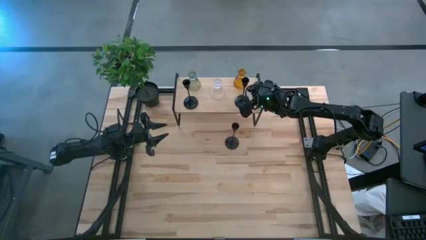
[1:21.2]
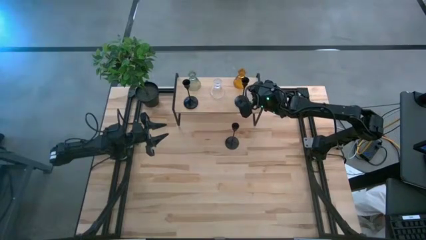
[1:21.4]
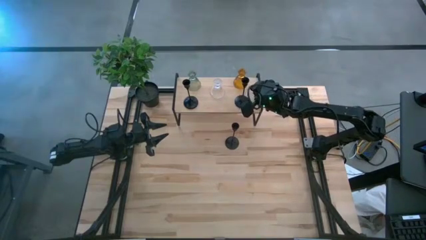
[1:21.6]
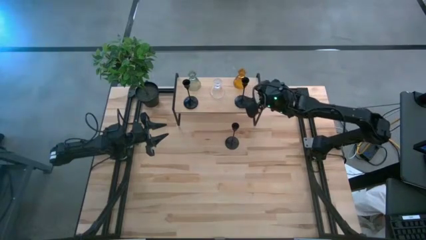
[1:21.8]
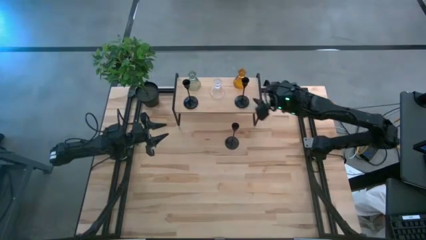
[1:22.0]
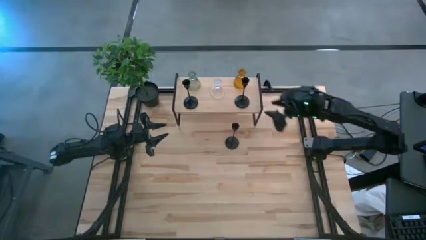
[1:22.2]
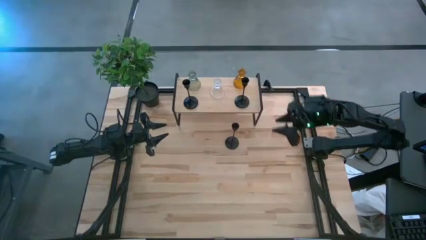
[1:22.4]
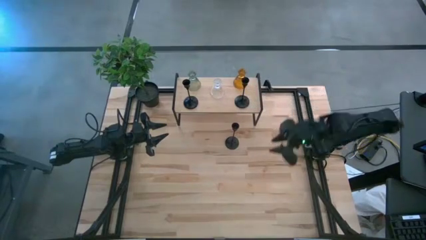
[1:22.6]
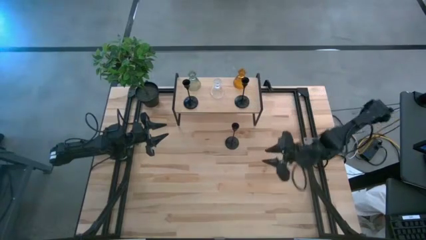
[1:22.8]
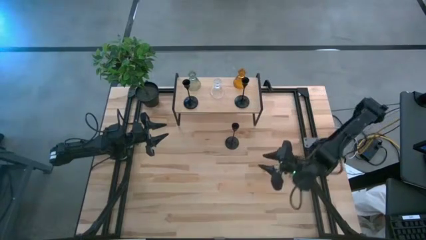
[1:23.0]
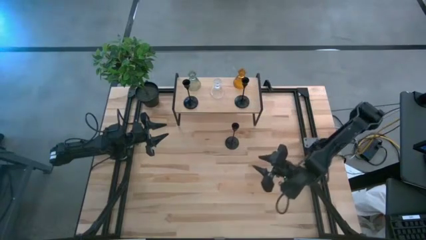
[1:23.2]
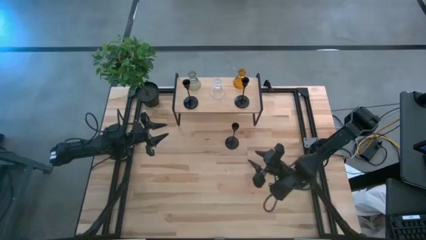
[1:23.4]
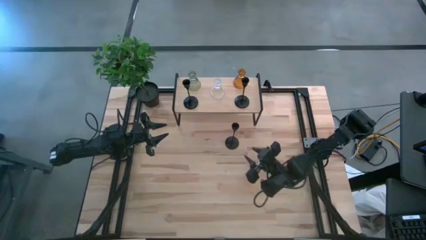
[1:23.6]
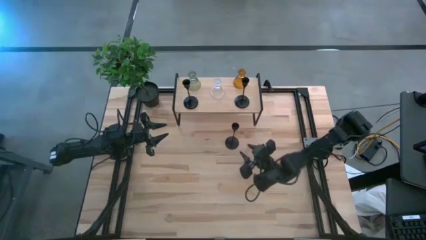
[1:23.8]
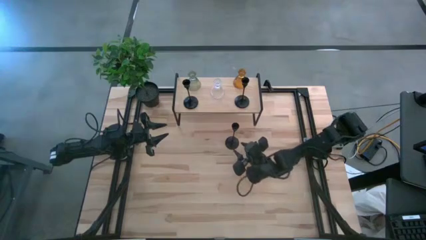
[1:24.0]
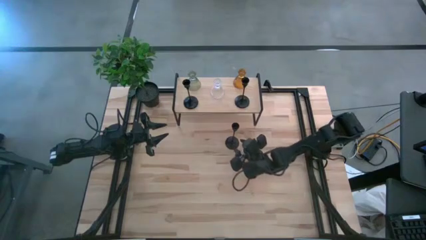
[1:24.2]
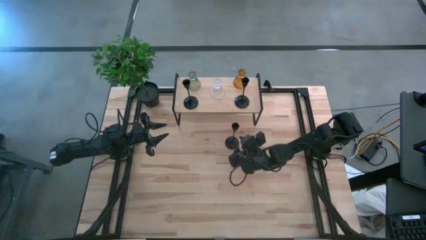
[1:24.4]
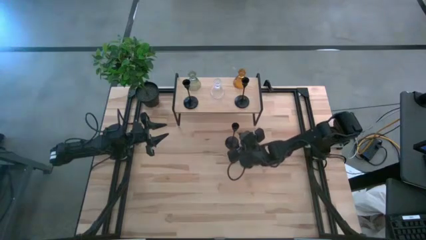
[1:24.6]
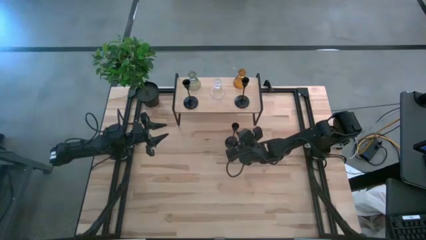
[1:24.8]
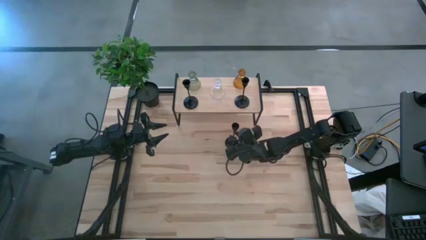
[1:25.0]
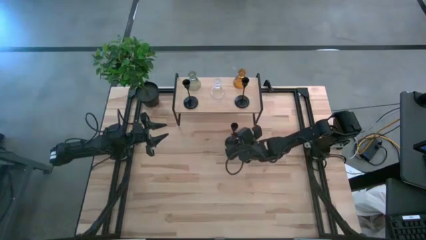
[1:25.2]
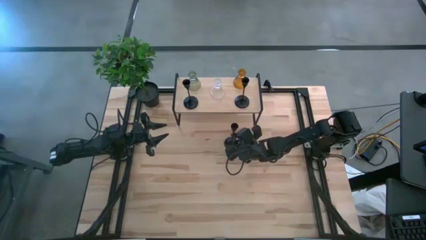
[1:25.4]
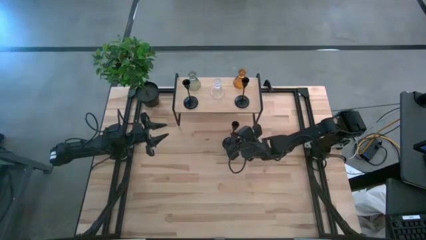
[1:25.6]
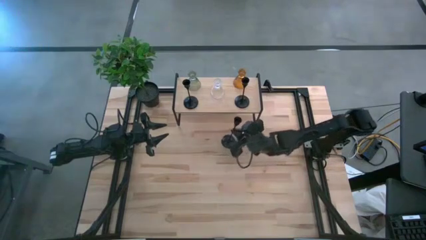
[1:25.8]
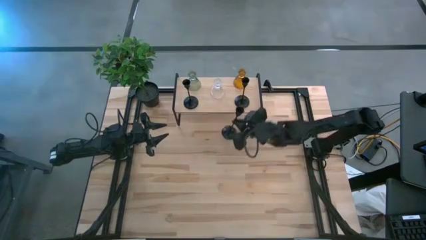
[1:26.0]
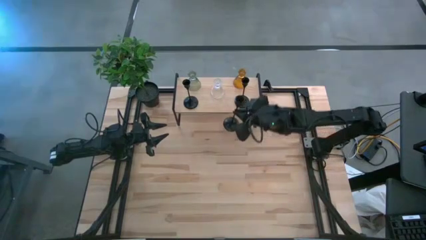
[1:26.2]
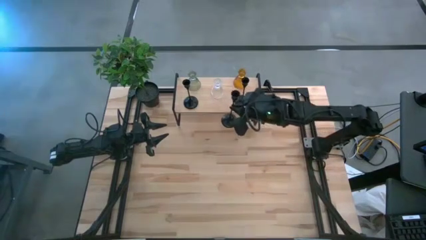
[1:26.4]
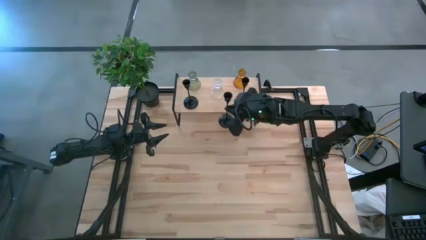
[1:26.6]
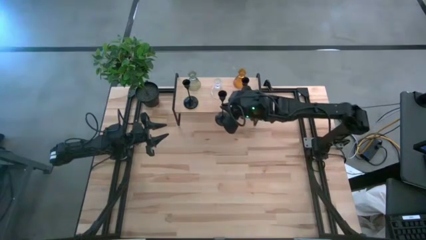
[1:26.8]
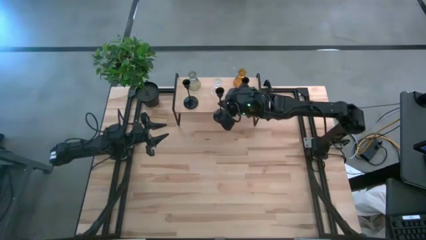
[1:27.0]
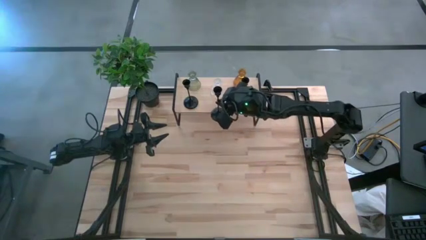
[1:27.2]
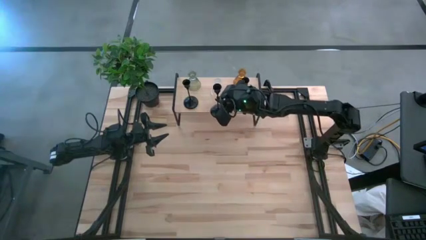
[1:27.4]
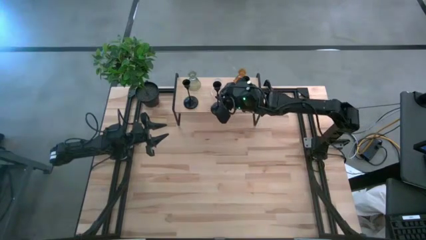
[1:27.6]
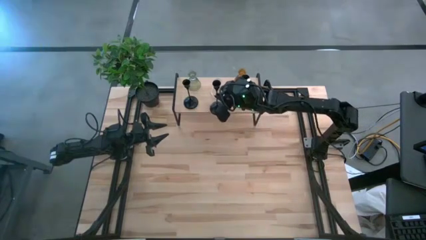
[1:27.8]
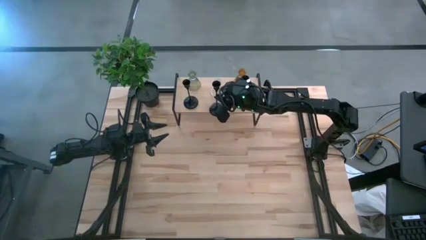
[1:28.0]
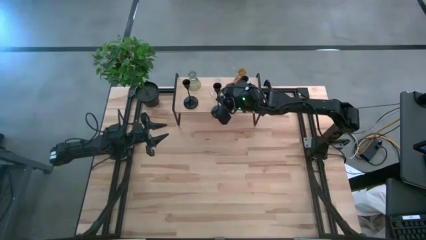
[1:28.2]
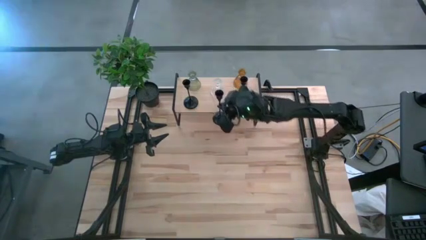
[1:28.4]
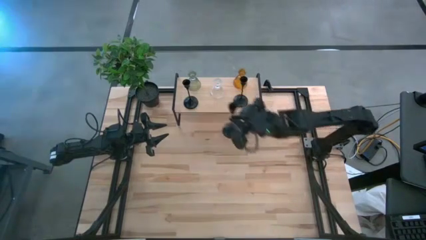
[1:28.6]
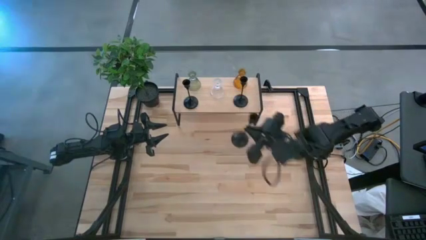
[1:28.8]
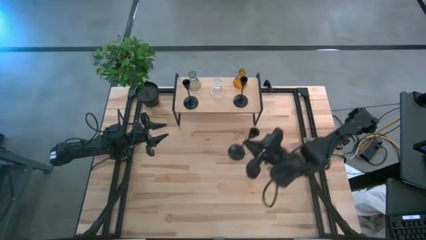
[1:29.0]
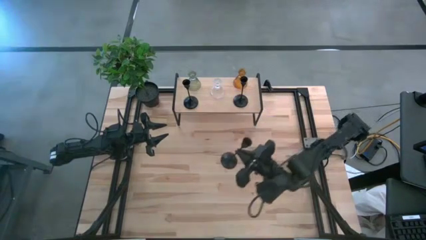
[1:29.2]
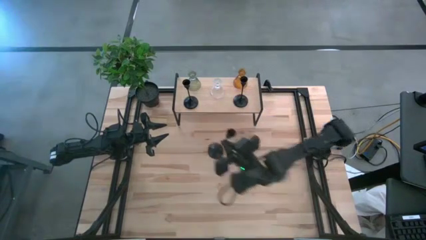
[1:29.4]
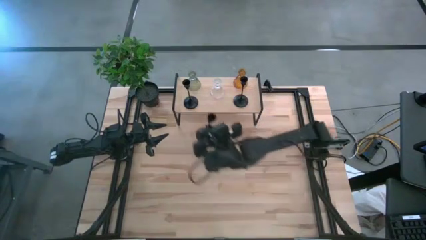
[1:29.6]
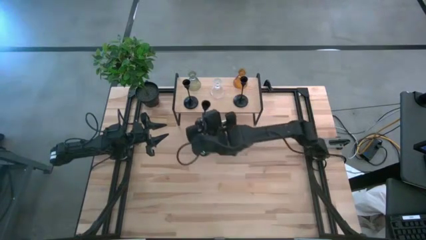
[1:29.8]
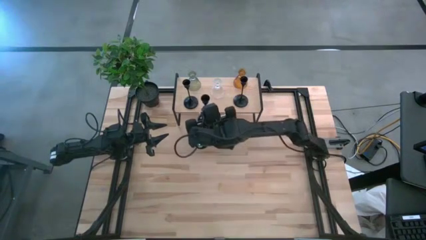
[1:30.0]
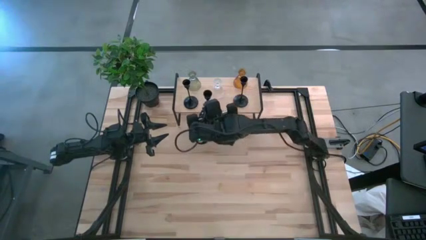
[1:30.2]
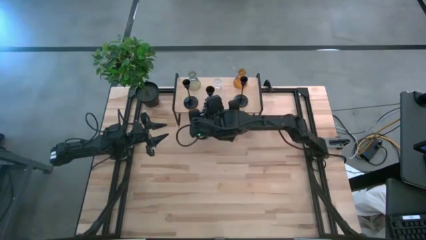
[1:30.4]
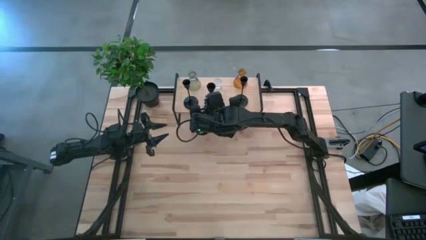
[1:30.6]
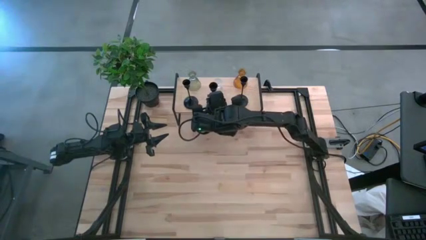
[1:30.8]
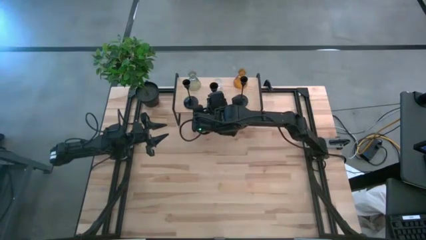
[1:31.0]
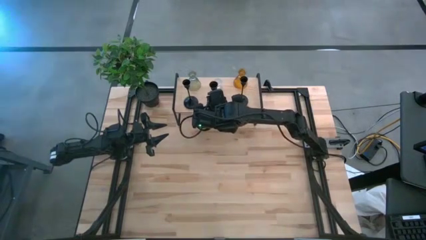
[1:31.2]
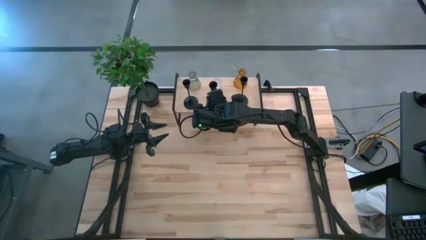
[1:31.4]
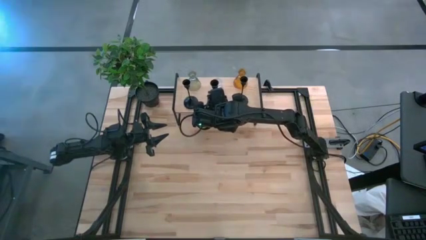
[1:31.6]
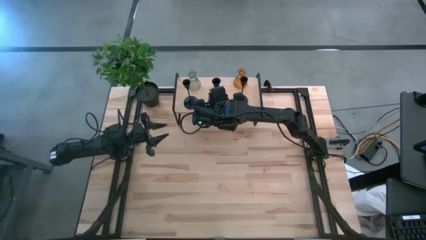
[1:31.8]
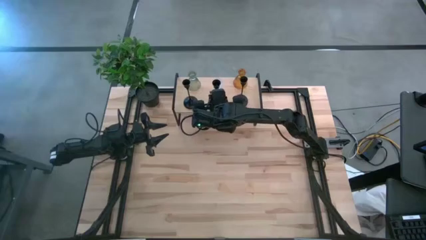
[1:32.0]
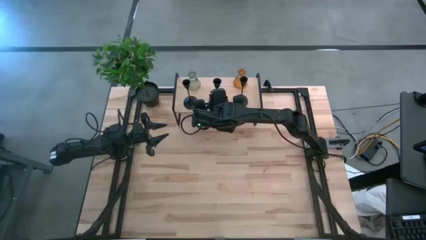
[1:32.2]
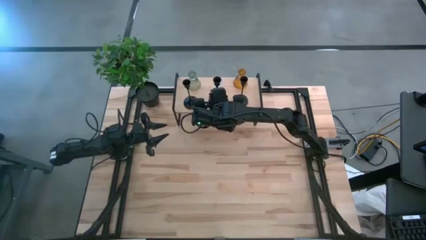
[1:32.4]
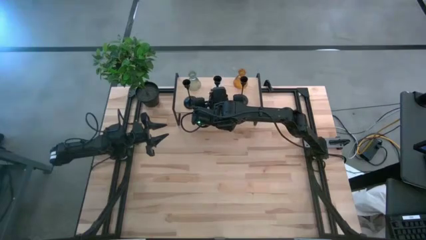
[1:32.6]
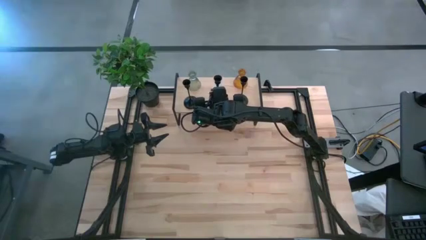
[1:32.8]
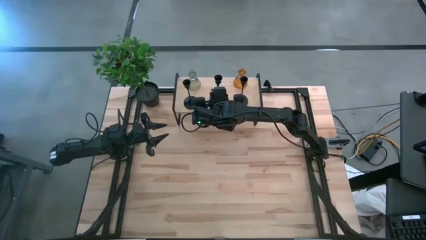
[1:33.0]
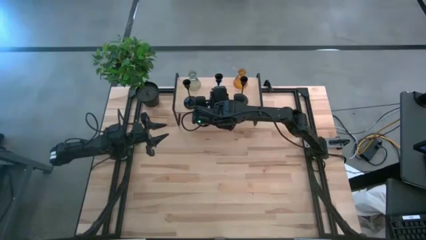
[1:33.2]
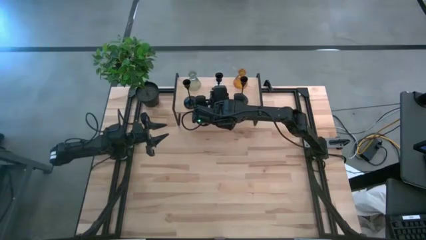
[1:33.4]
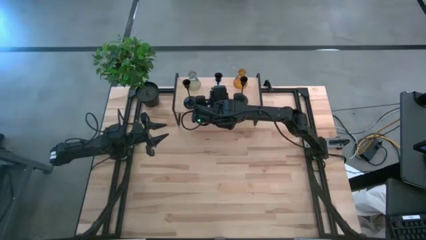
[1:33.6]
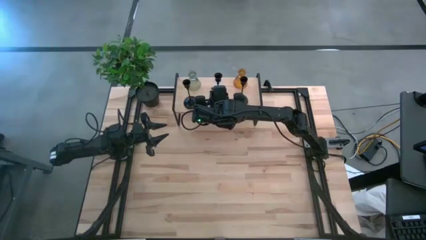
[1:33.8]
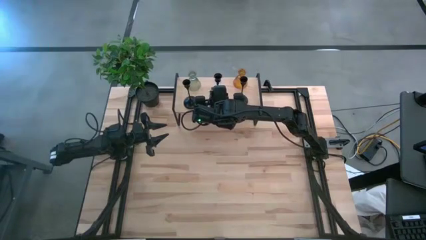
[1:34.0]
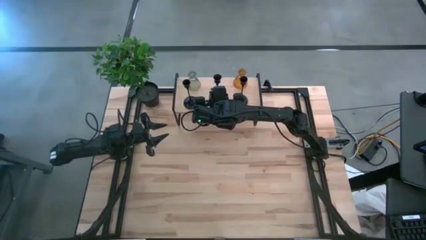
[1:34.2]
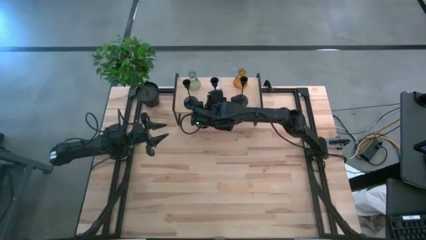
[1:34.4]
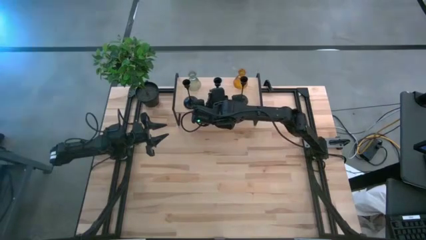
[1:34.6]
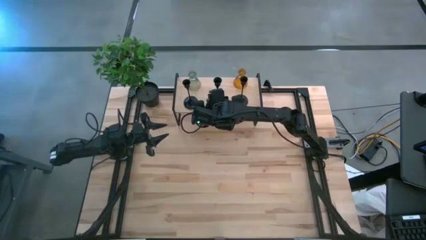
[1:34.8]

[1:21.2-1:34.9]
Task: Pick & Place candle stick holders
Put the black candle holder on the shelf aligned with the transparent candle holder

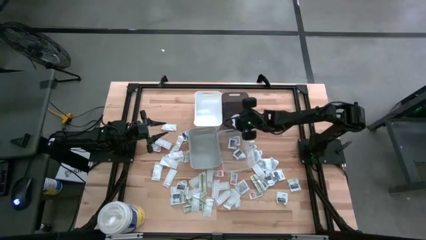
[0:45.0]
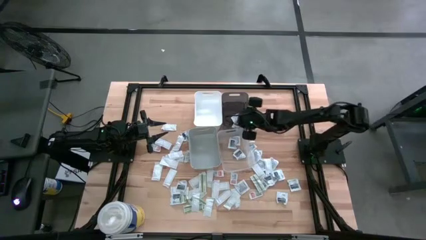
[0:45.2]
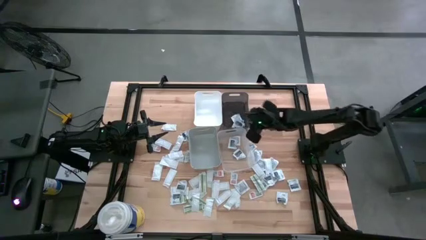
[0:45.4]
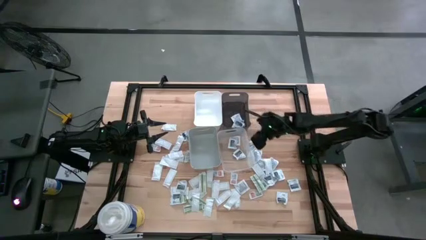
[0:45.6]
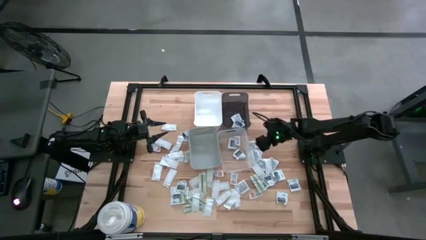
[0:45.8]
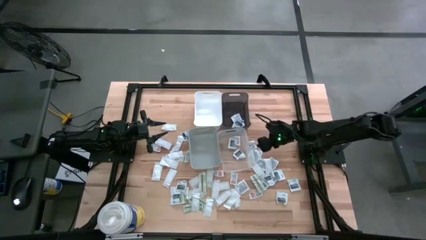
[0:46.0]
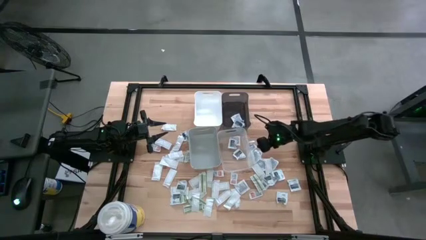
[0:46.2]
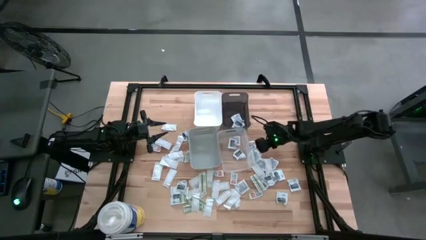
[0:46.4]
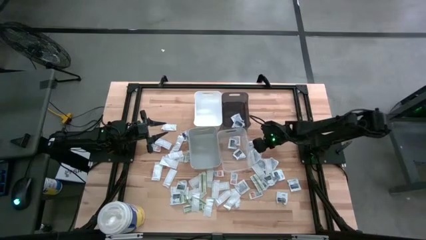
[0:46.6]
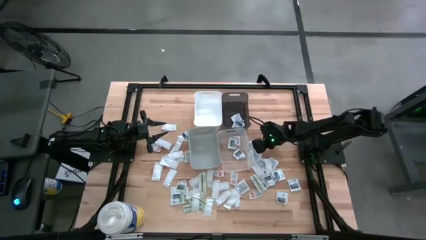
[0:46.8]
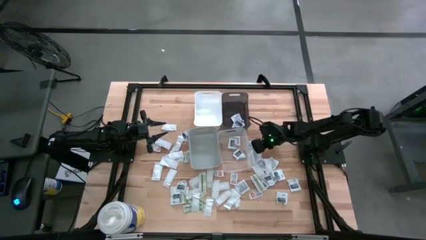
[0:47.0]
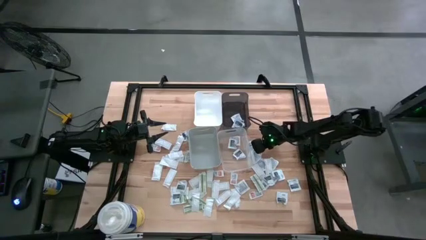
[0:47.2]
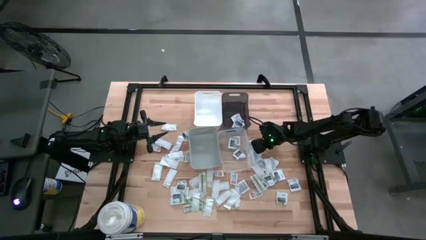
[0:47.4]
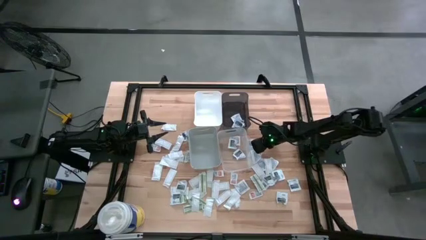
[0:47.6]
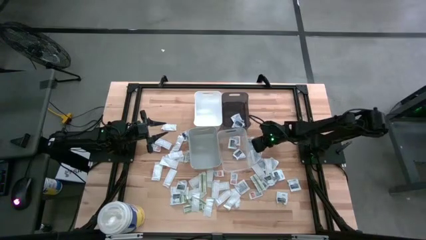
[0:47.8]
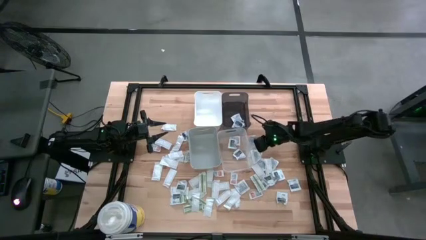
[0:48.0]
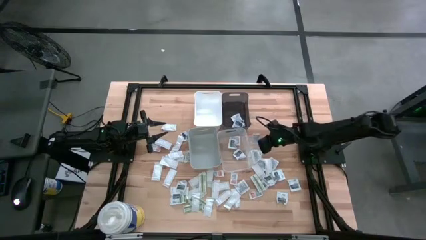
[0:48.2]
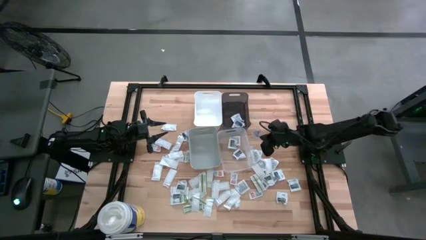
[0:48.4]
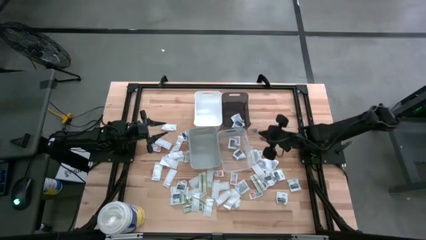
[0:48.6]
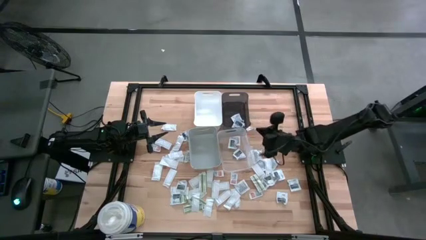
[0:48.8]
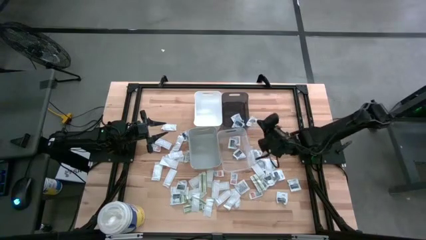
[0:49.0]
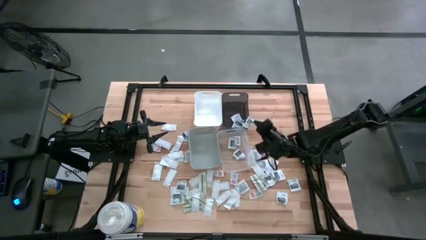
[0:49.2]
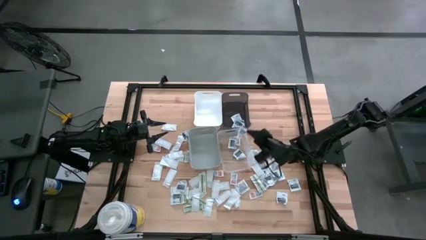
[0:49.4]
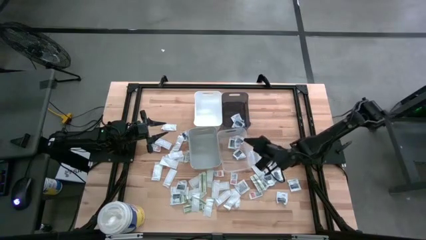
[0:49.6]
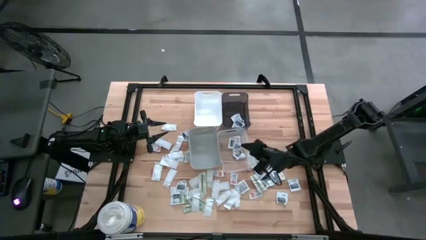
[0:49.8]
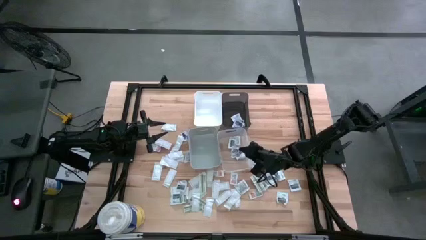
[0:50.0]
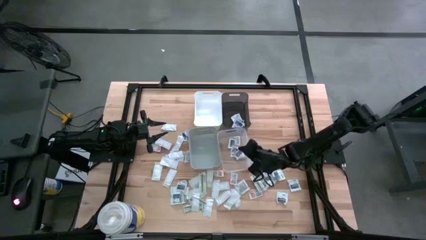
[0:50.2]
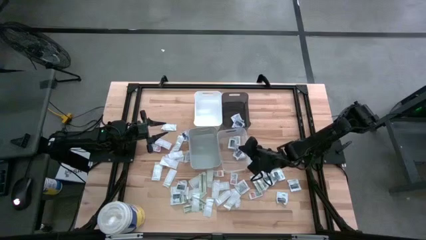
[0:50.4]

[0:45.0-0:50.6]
Task: Pick & Place First Aid Supplies
Put the gray towelette pack into the transparent bin
